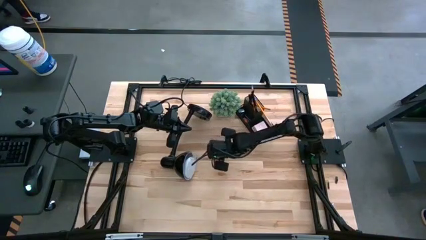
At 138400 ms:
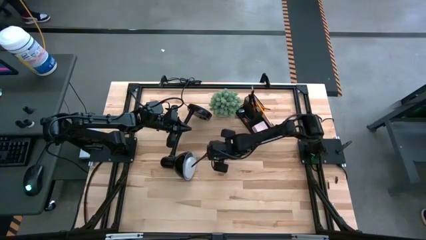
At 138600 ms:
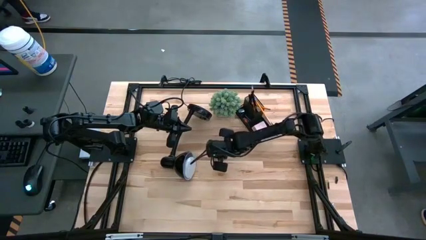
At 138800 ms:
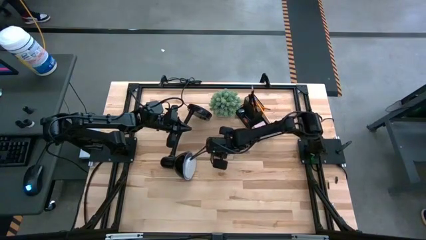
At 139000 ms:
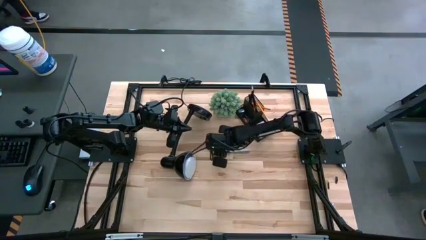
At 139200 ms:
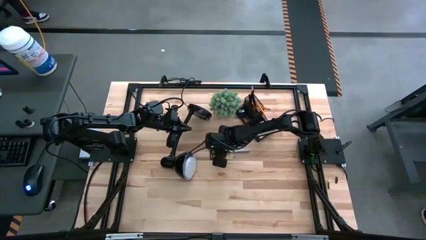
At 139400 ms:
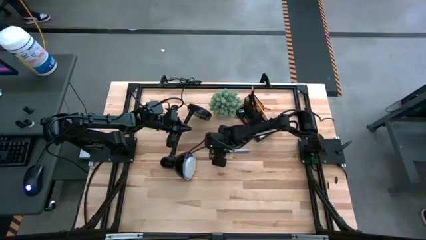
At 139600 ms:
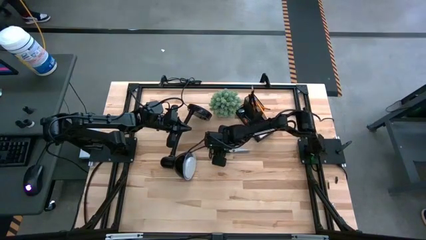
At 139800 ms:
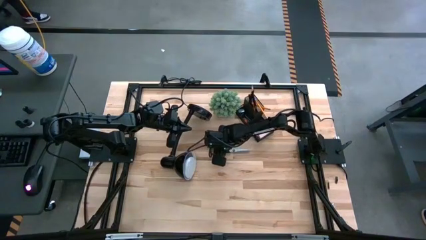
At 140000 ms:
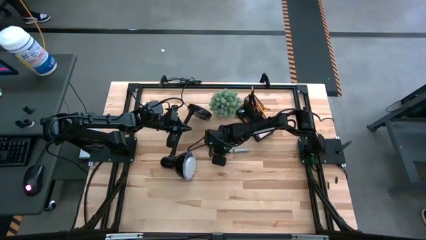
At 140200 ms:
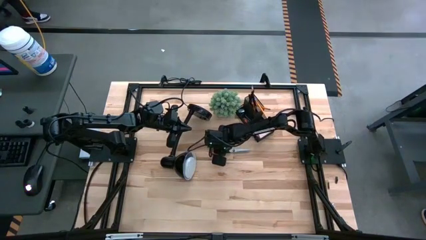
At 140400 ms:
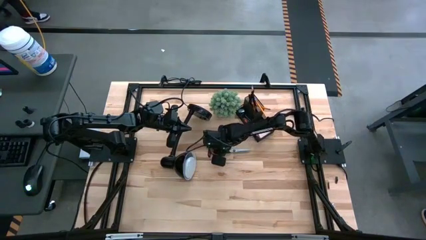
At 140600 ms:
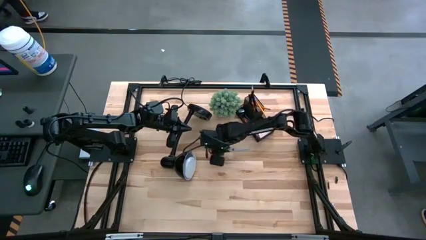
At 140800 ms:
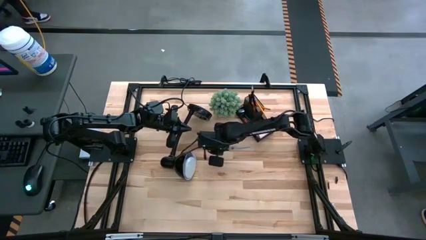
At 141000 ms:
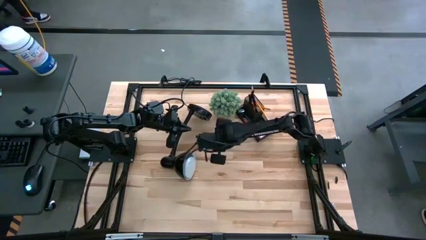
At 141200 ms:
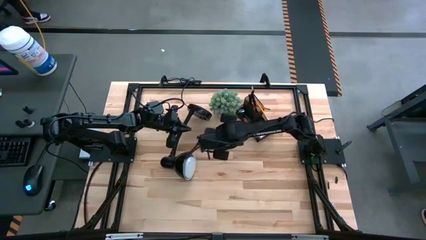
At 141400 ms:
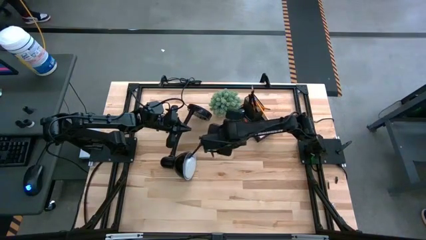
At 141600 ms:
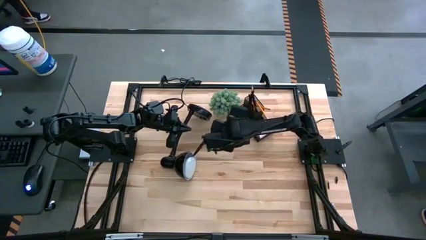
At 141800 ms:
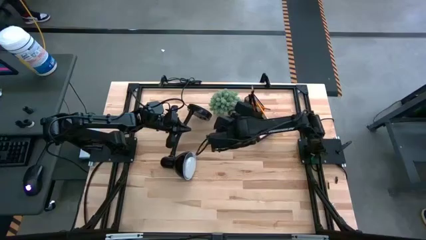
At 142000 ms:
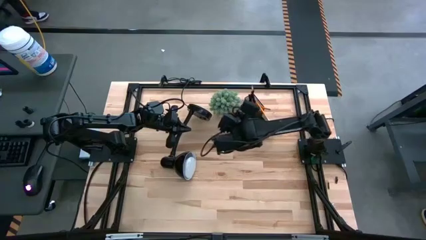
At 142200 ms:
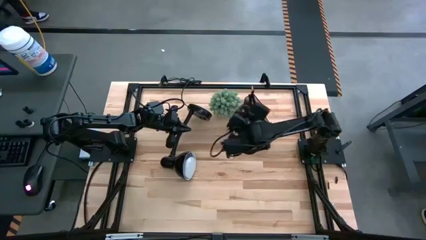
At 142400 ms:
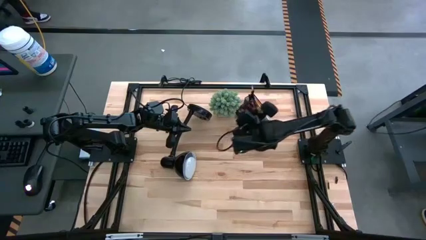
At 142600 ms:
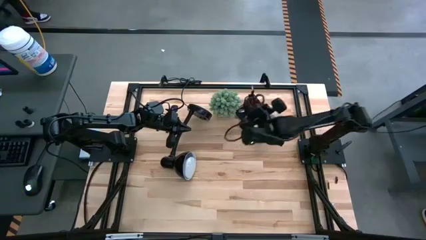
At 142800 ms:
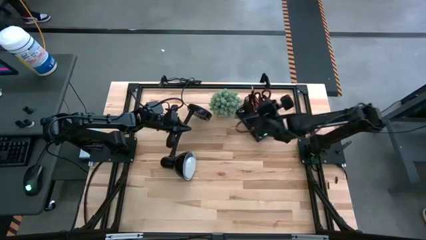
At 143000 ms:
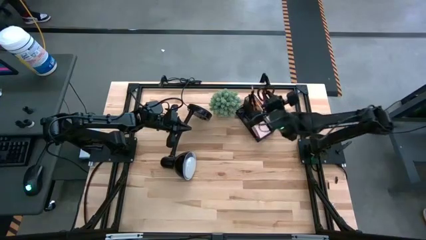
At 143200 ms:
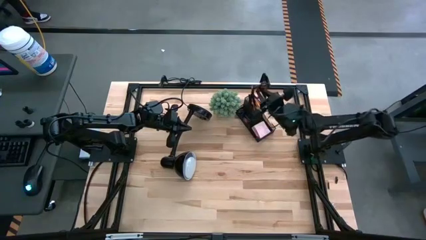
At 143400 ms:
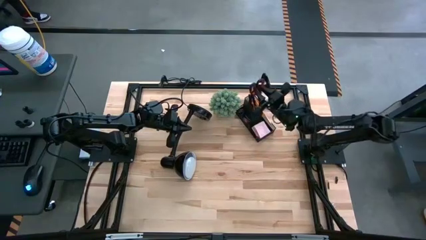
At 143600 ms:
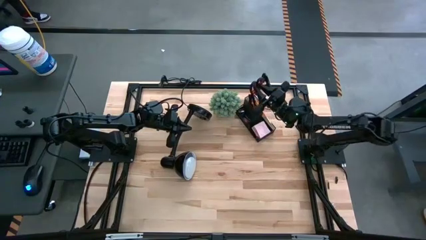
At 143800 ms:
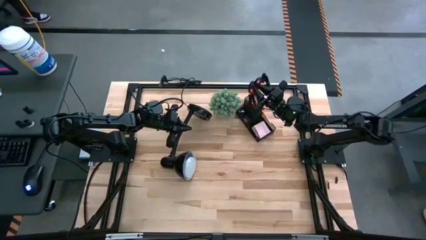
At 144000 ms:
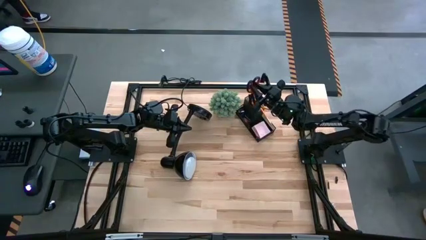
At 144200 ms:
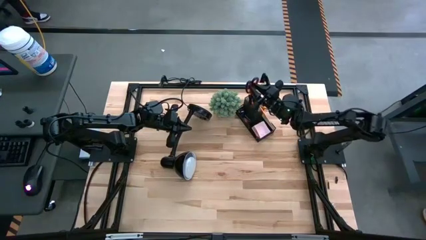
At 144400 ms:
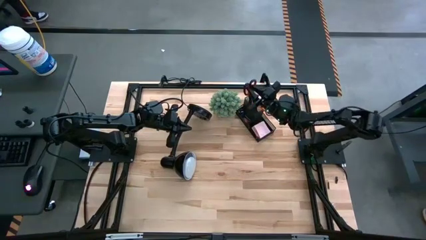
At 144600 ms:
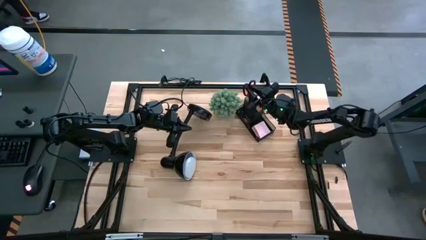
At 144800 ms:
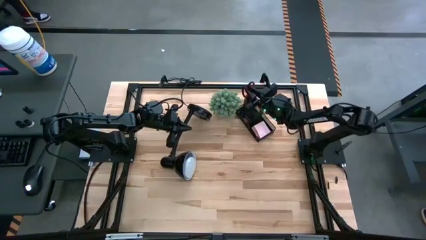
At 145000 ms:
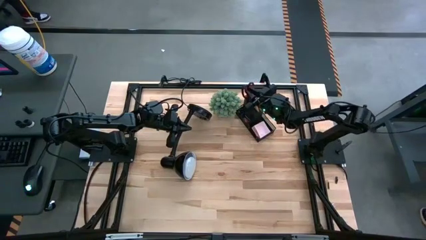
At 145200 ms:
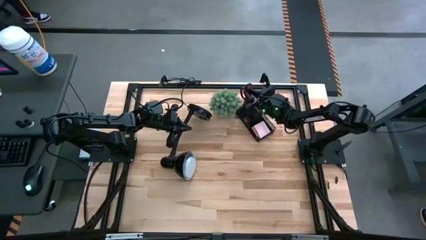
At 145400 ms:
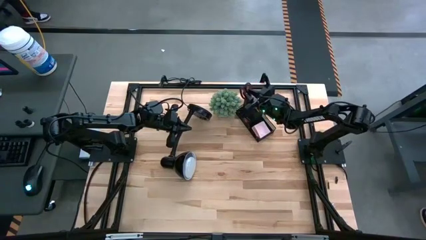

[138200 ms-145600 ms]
Task: Pick and place office supplies into organizer
Put the scissors into the top left section of the desk organizer

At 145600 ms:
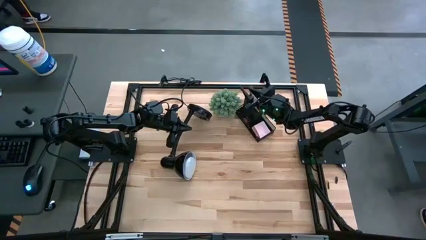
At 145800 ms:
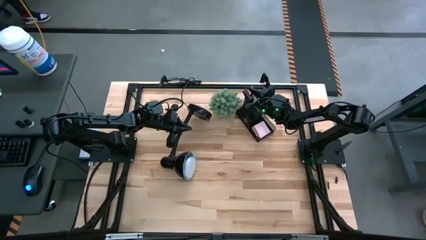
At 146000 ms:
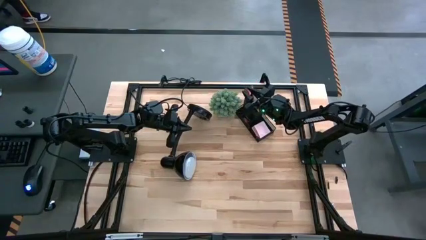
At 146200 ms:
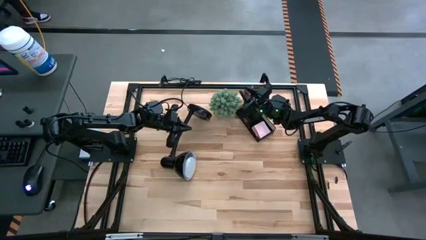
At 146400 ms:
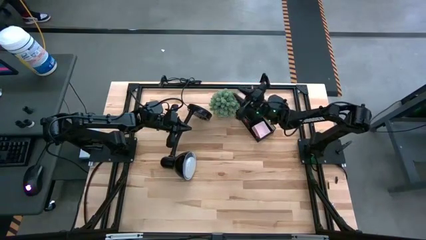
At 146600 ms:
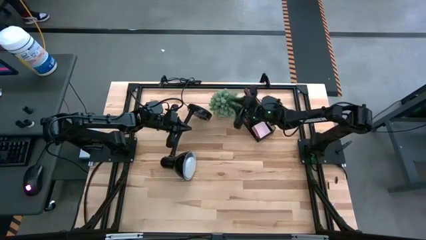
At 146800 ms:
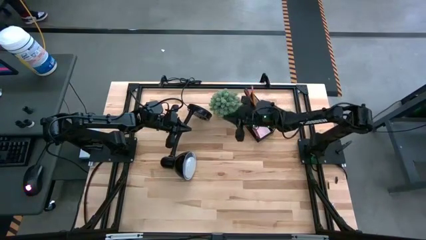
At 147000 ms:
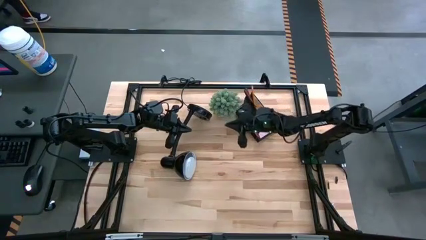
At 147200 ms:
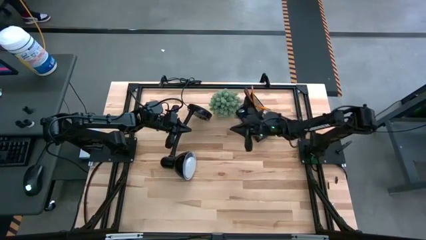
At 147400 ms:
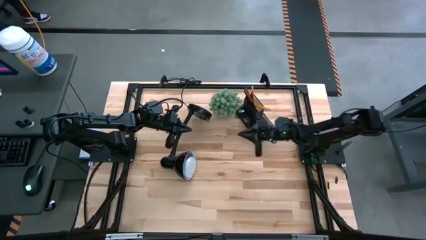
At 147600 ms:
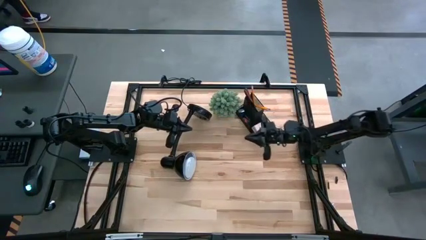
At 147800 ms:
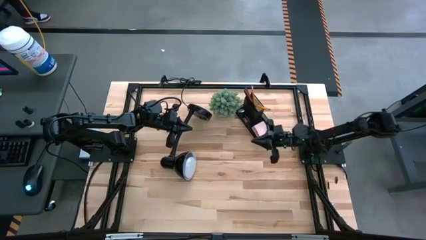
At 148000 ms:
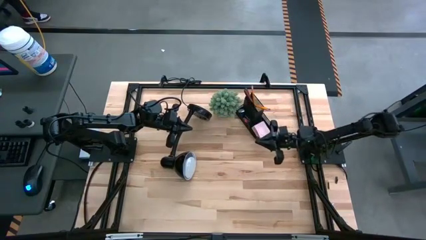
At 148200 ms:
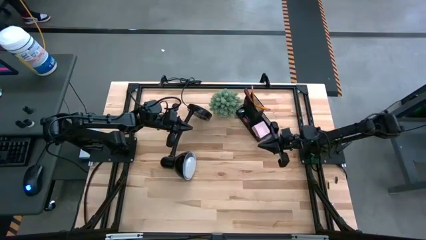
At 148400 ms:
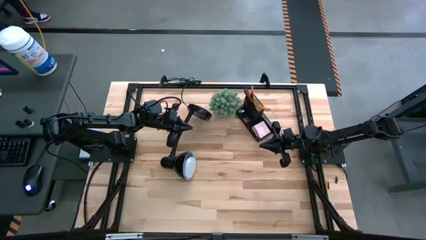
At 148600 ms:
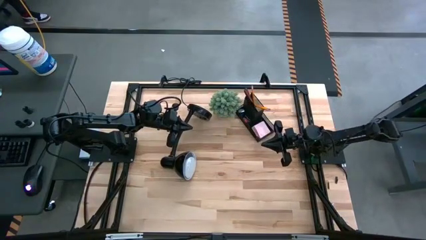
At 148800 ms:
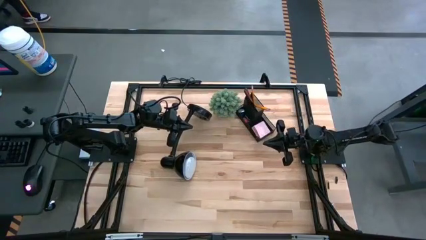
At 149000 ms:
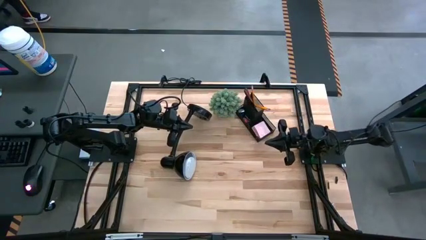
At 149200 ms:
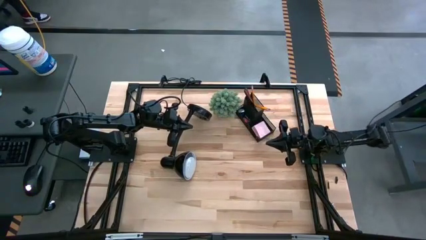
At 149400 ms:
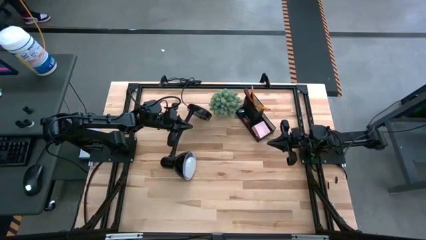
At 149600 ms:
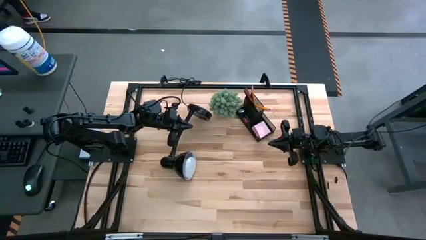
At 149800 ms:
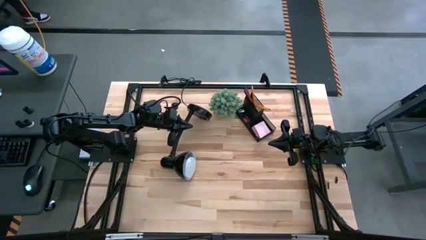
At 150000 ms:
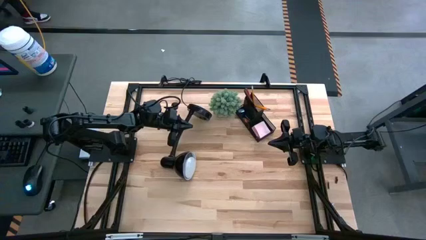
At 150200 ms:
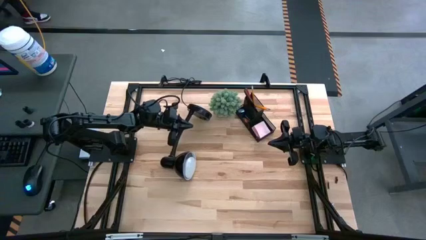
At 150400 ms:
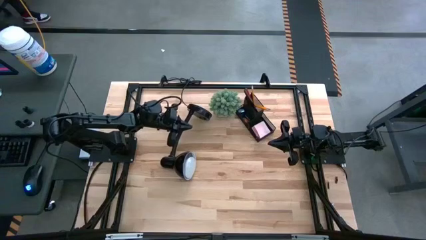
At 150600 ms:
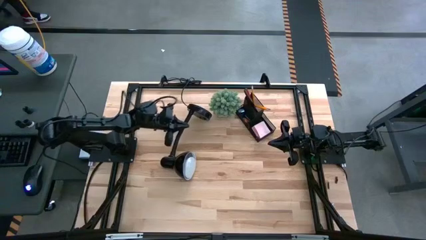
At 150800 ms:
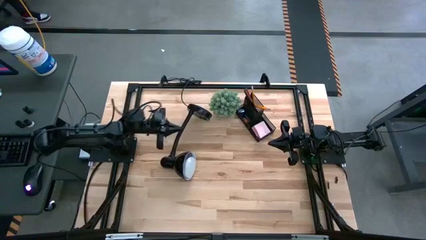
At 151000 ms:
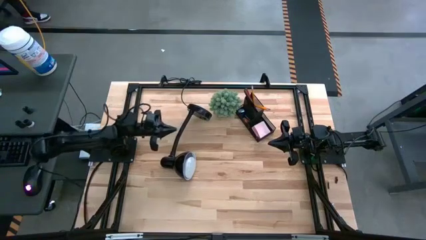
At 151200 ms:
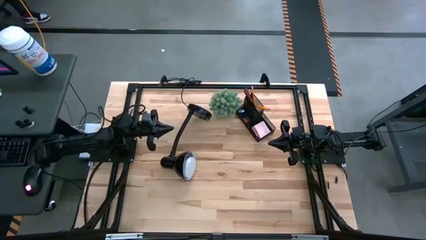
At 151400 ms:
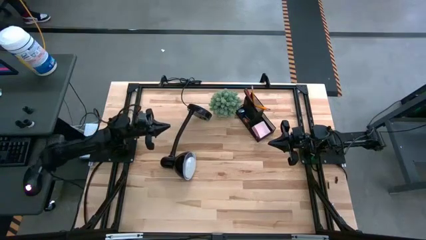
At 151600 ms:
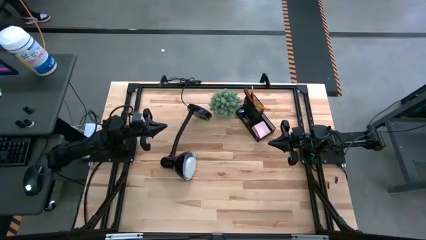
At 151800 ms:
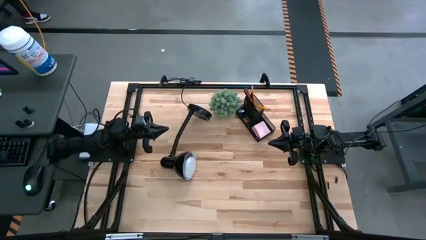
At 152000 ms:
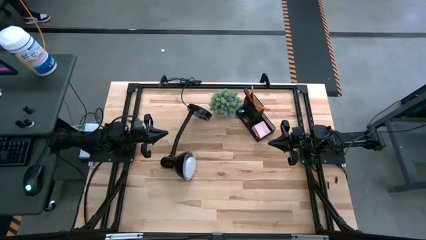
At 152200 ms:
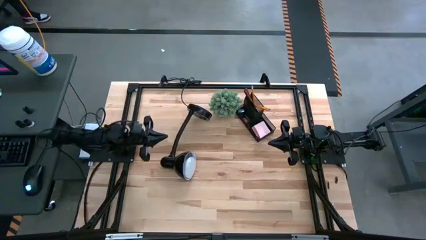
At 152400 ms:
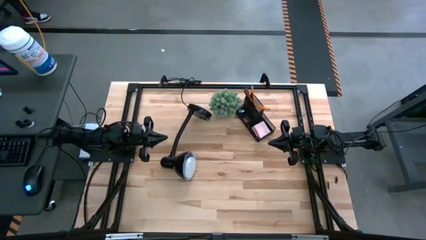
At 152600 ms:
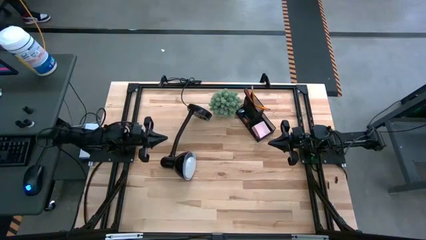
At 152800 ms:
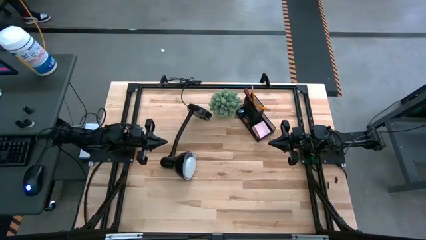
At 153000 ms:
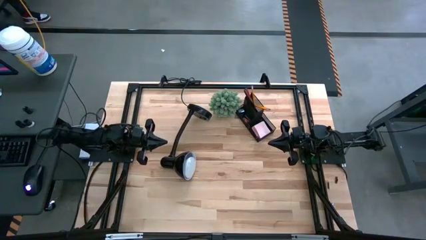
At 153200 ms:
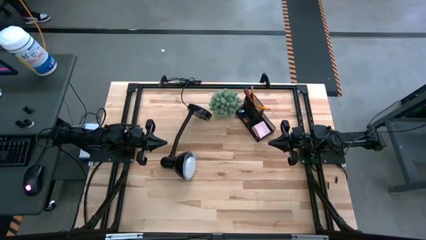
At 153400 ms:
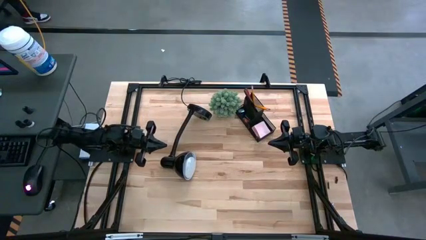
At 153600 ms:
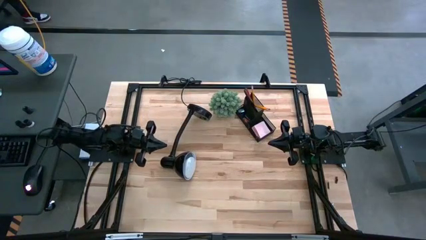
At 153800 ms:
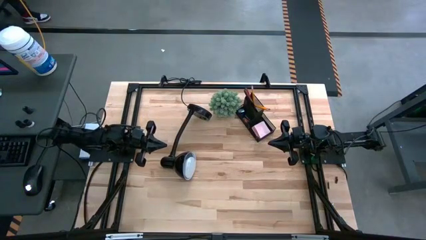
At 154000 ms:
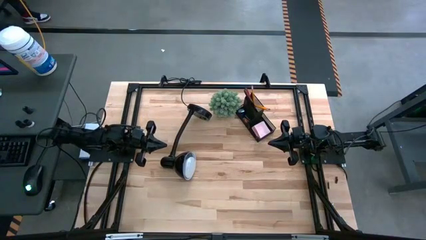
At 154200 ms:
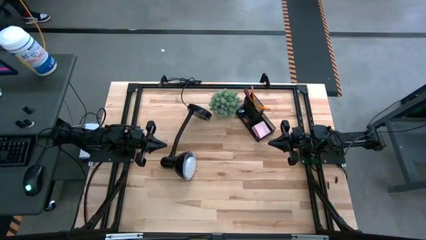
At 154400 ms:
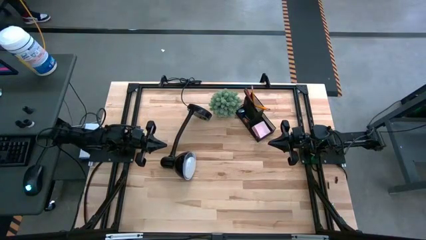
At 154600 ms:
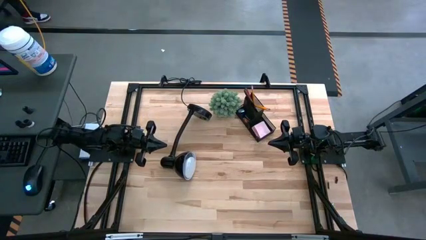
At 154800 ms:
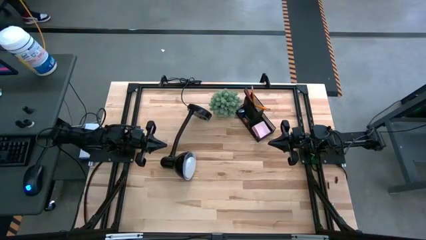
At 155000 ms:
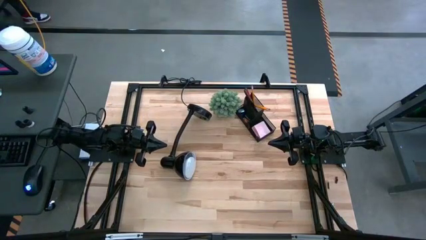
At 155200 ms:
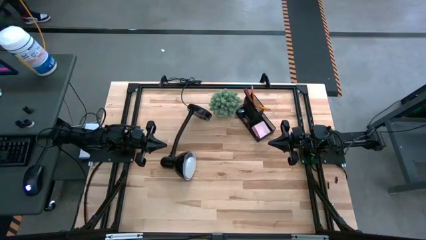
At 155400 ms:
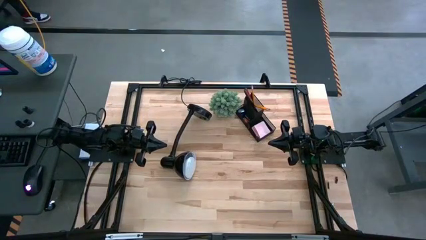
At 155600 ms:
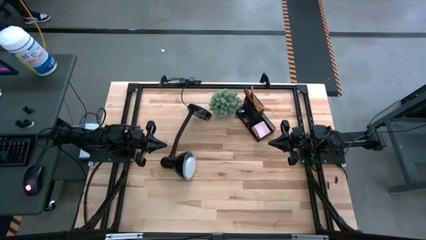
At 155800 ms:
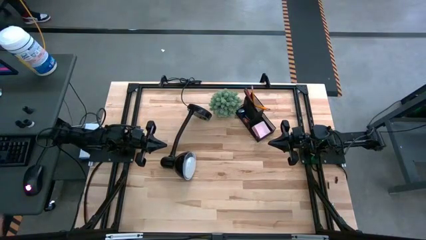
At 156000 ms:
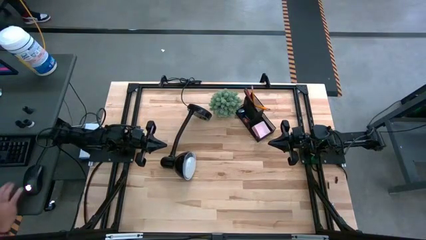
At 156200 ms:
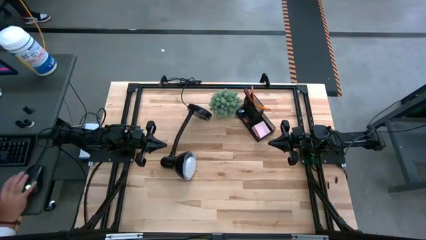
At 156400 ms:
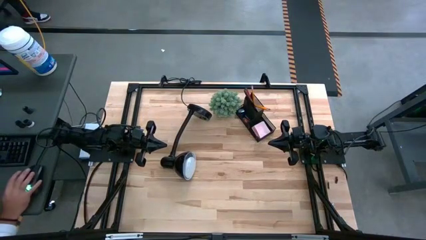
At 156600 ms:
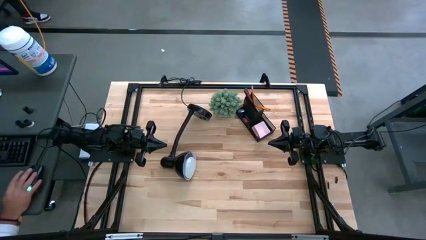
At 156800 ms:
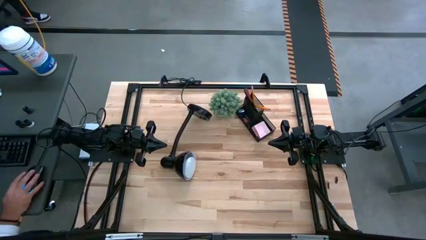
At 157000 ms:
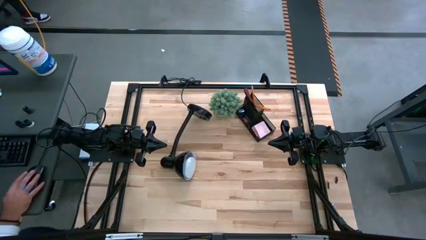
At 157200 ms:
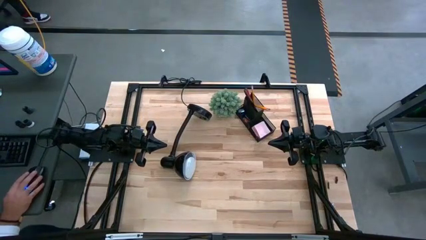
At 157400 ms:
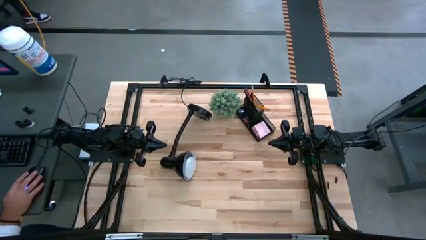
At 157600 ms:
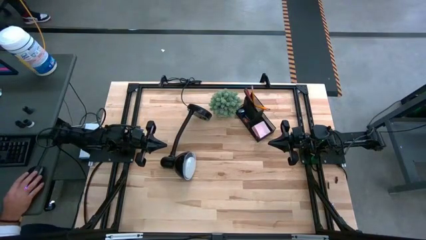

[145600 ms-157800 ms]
Return to Home Position
